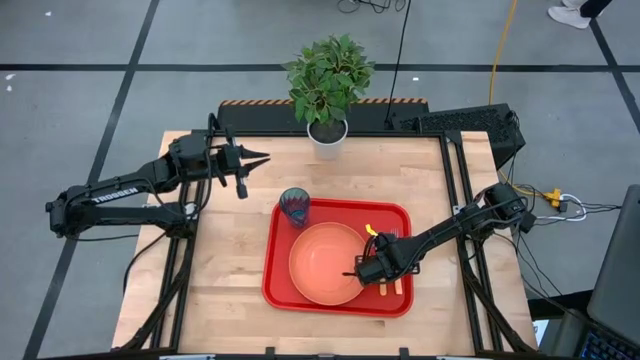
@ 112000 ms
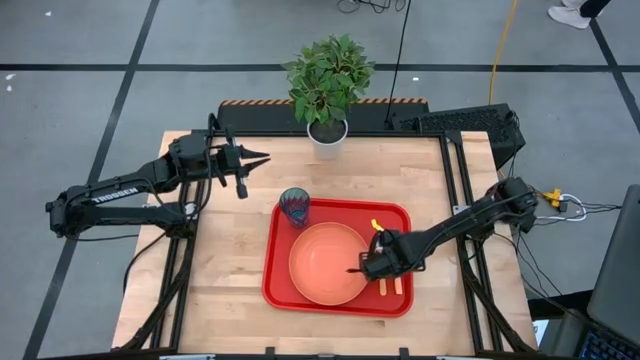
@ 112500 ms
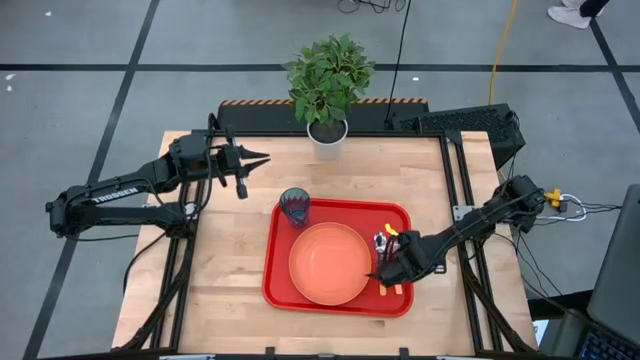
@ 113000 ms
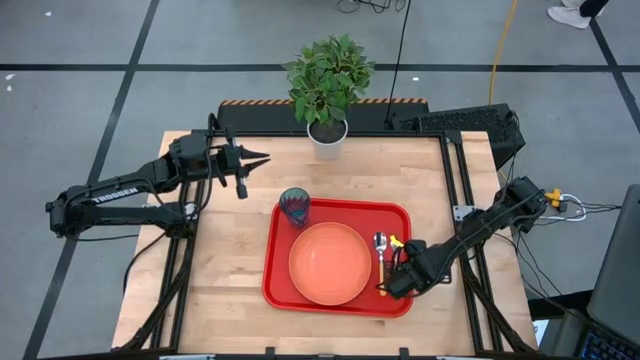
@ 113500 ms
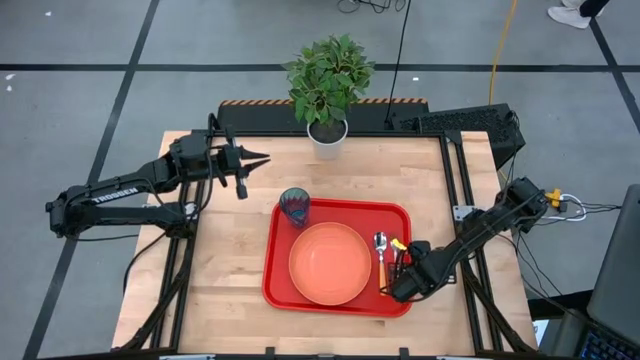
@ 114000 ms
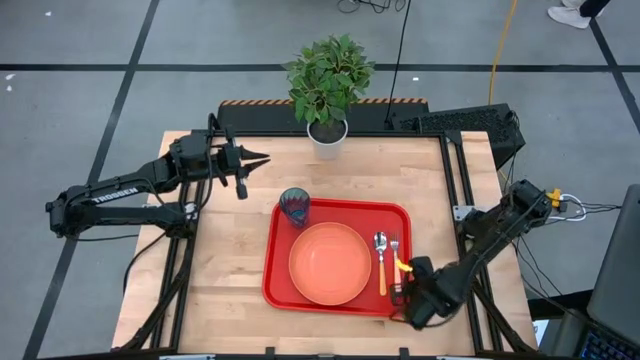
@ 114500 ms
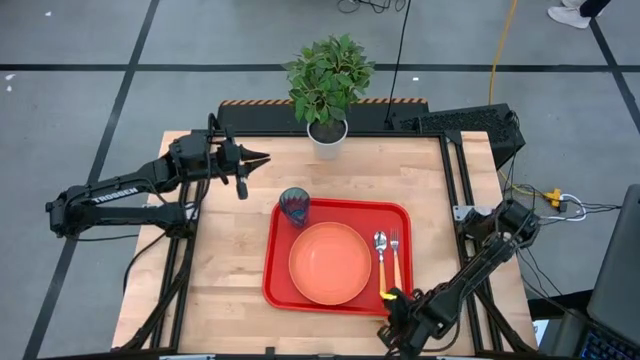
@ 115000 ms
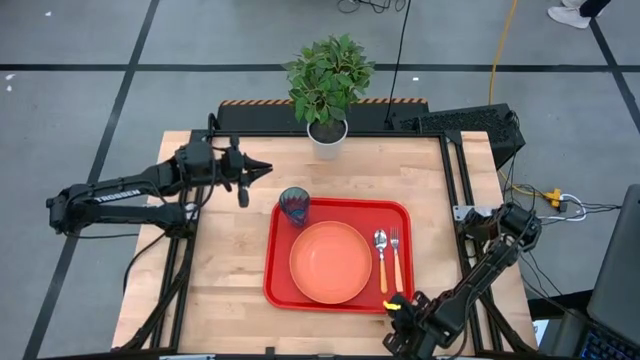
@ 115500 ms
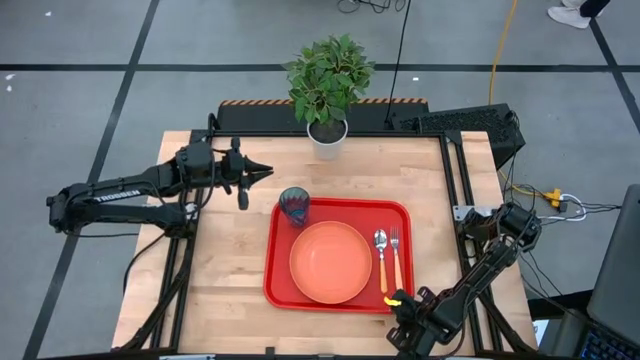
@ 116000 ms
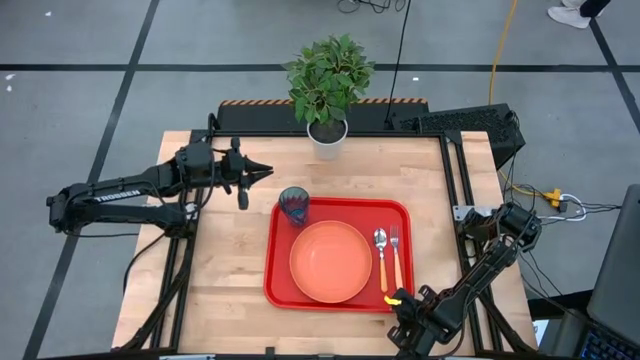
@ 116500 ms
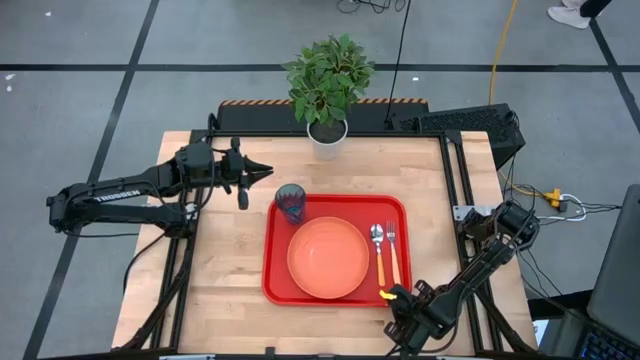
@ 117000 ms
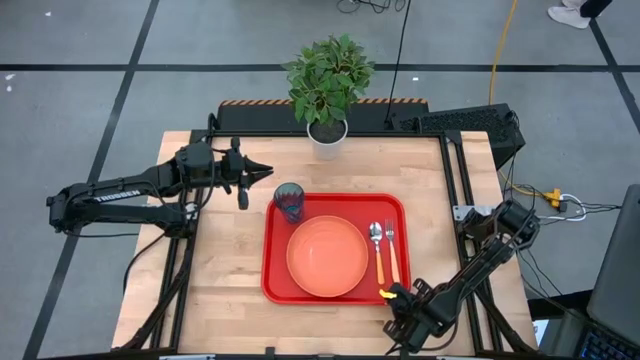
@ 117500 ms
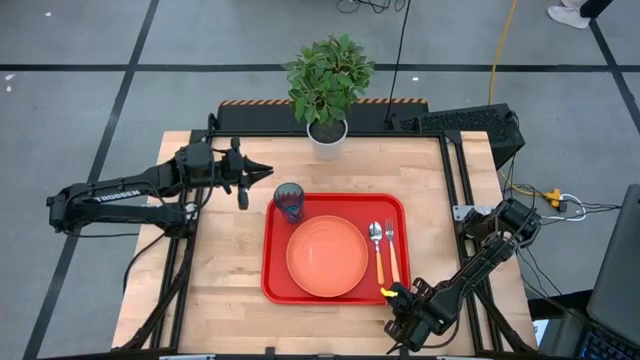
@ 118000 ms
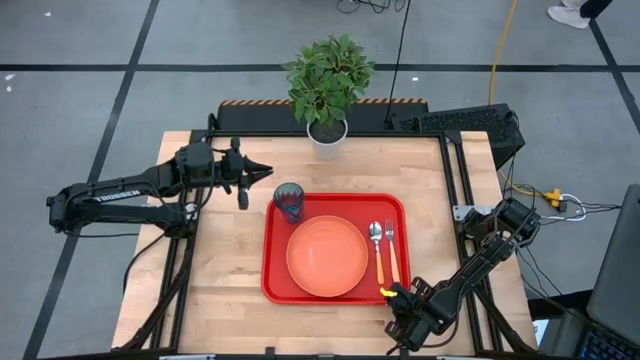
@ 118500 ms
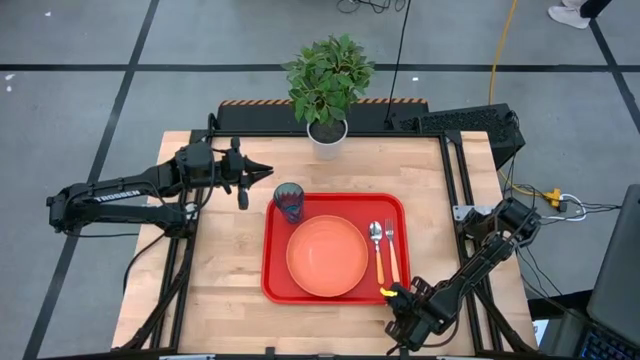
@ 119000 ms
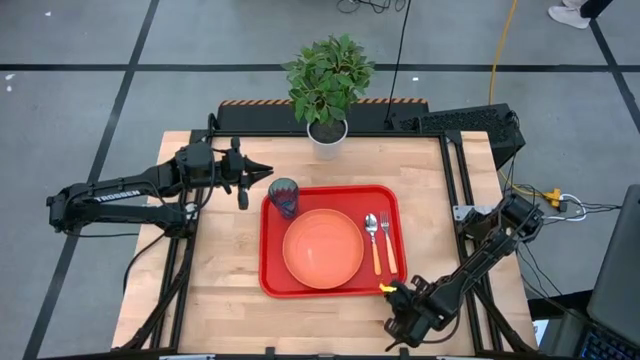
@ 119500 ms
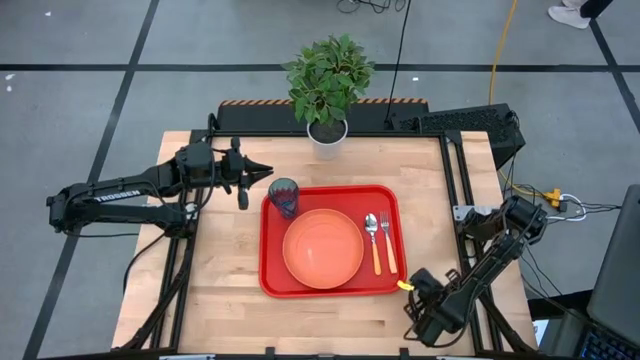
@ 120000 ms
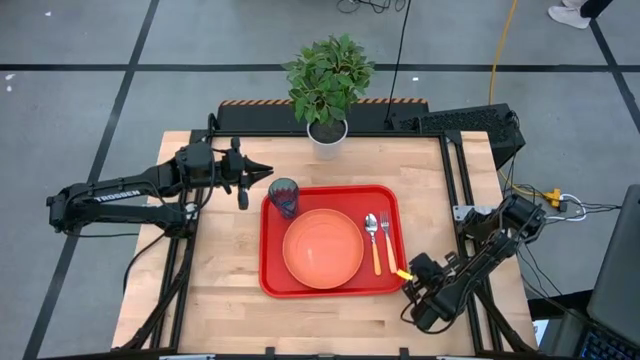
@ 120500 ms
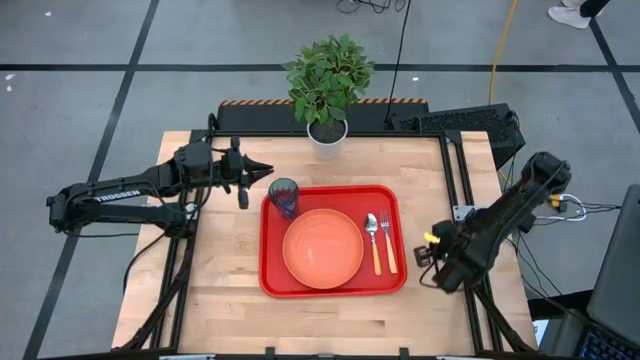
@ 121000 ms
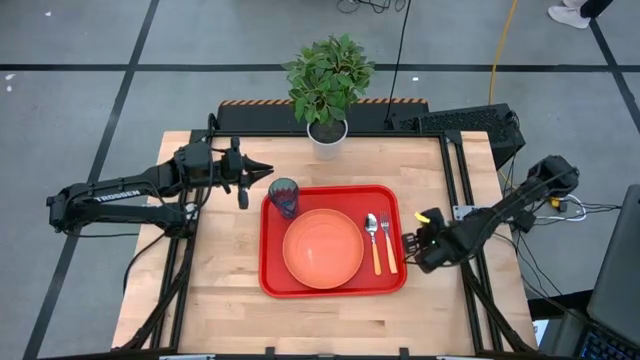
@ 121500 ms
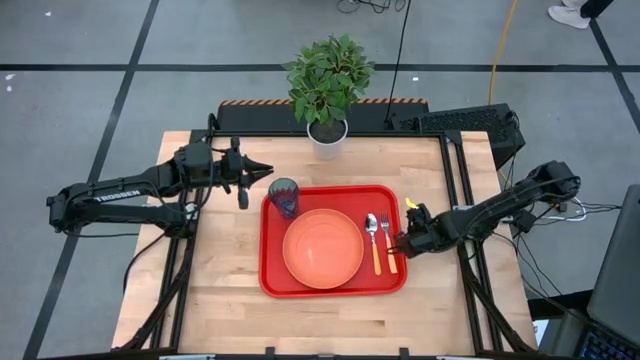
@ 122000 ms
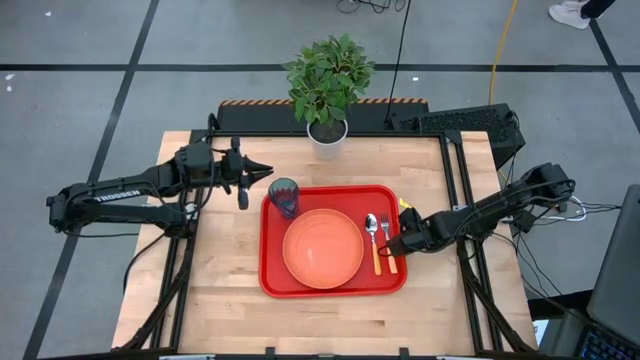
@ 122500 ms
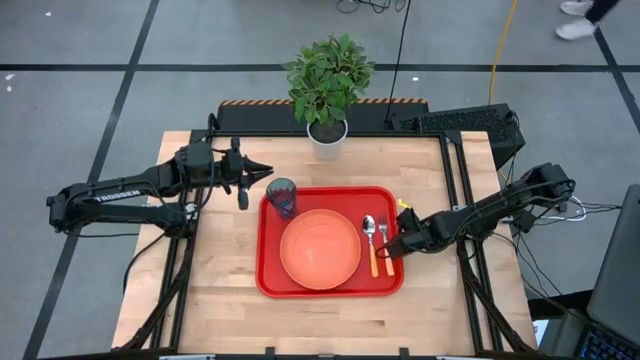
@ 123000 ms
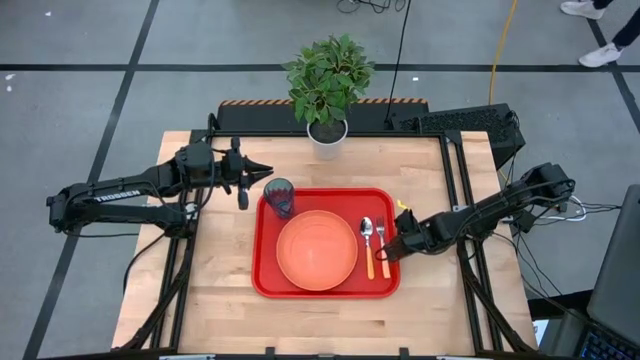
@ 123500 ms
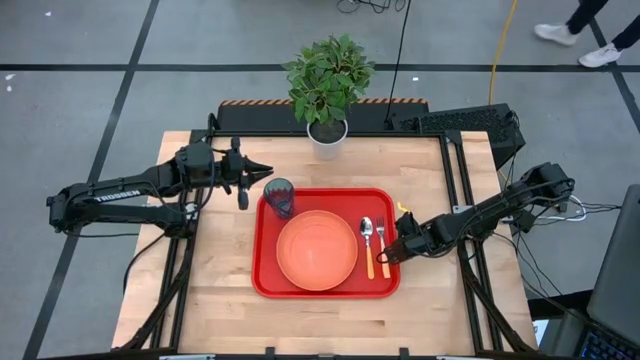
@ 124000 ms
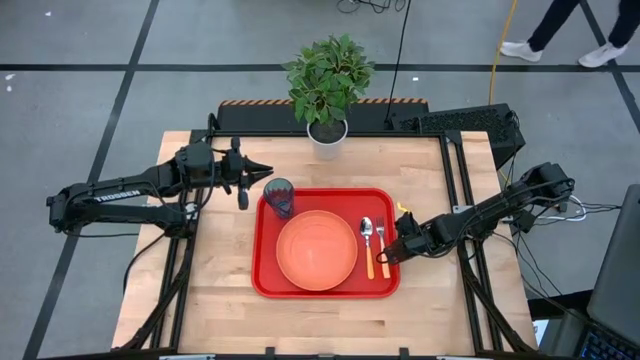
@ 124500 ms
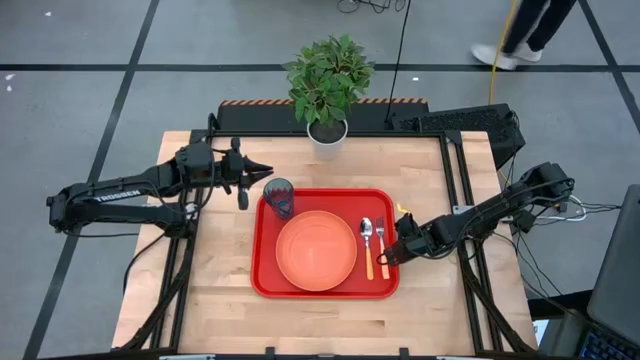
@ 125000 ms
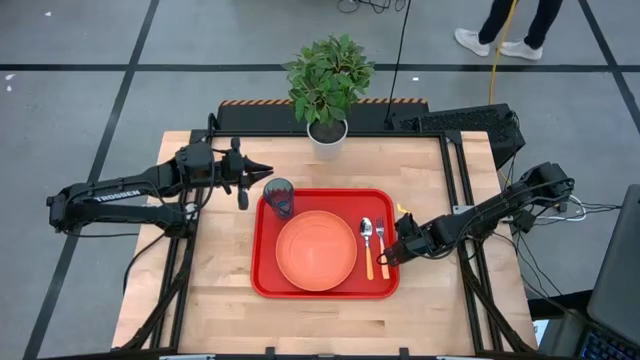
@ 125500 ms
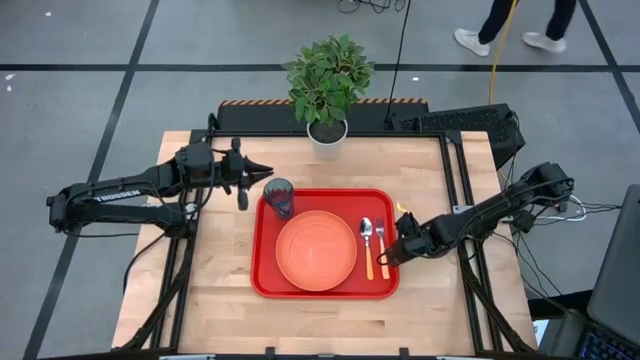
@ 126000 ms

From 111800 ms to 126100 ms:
Task: Pick and place plate/cup/fork/spoon on tray
Adjust the red tray

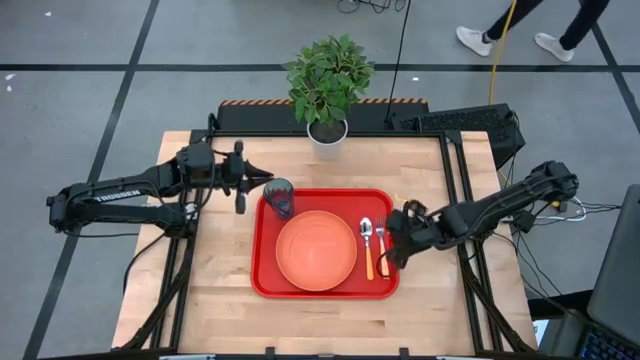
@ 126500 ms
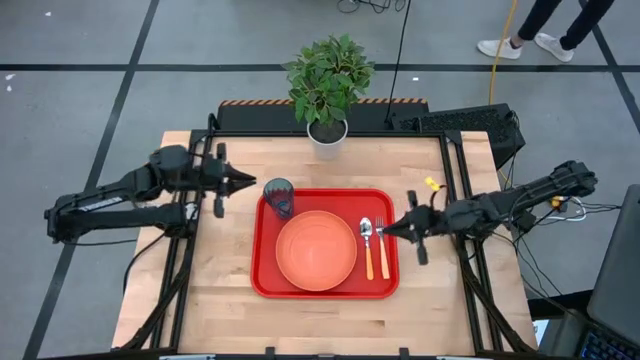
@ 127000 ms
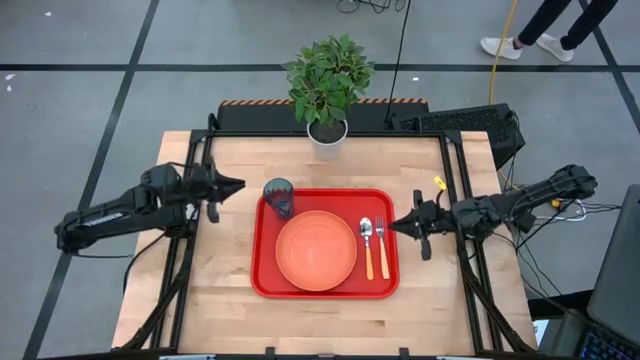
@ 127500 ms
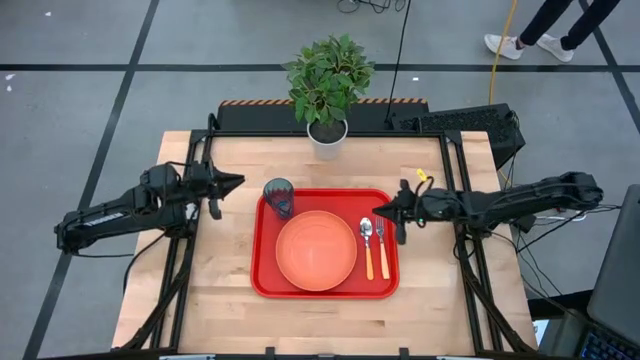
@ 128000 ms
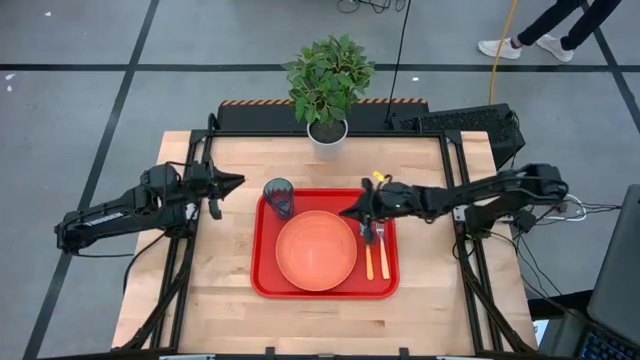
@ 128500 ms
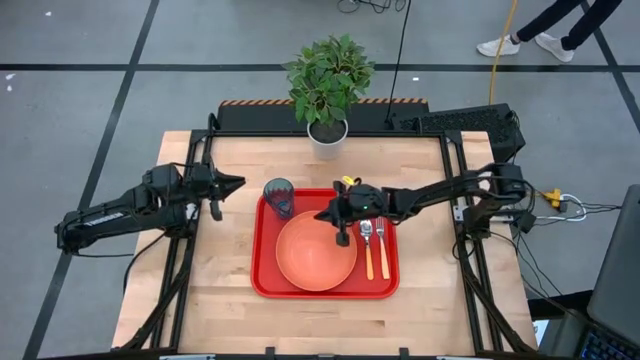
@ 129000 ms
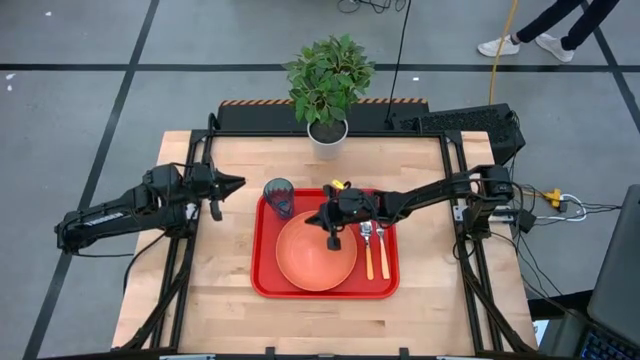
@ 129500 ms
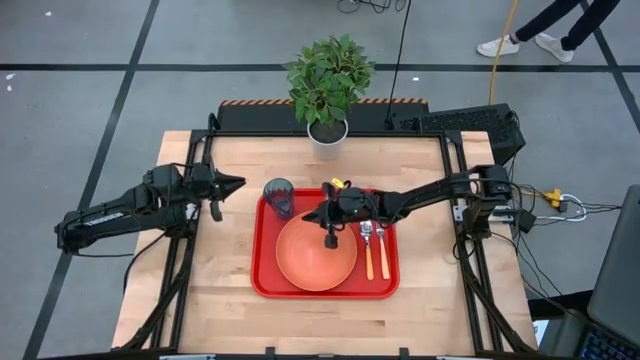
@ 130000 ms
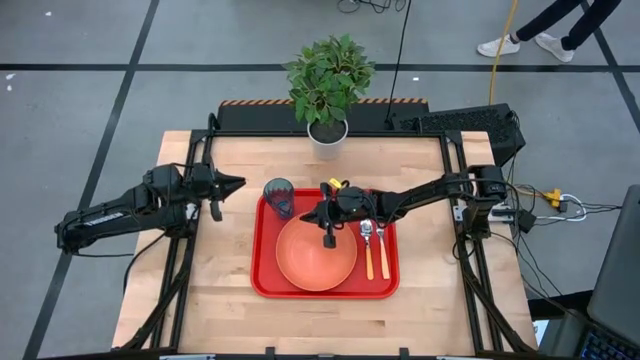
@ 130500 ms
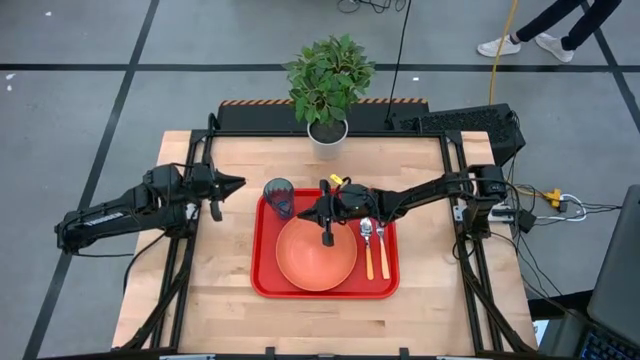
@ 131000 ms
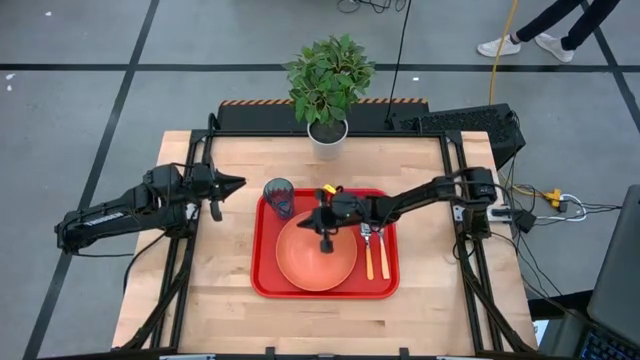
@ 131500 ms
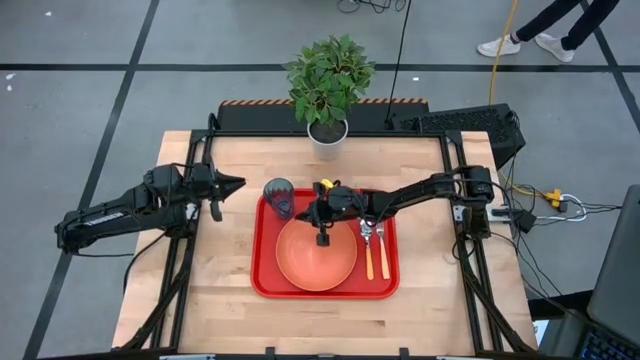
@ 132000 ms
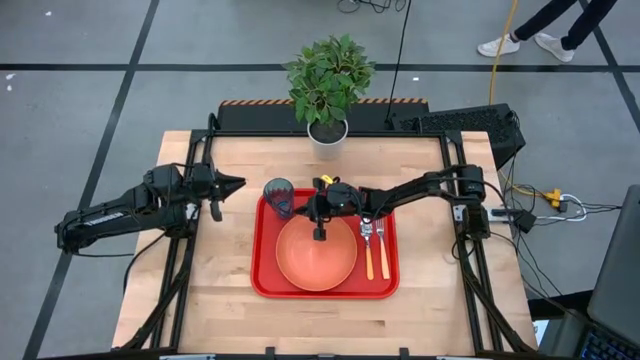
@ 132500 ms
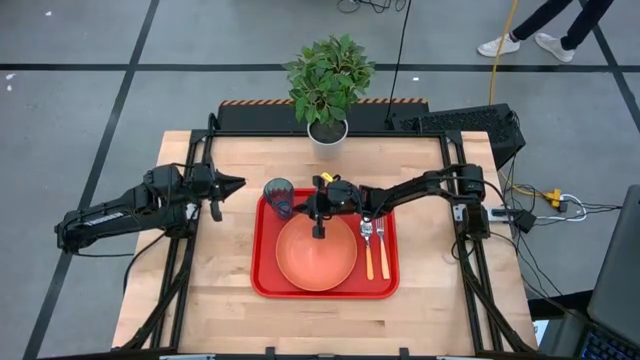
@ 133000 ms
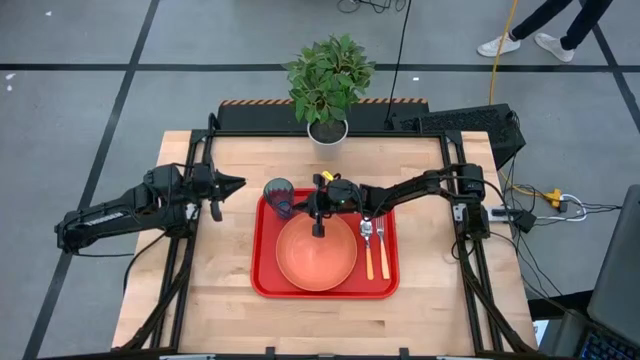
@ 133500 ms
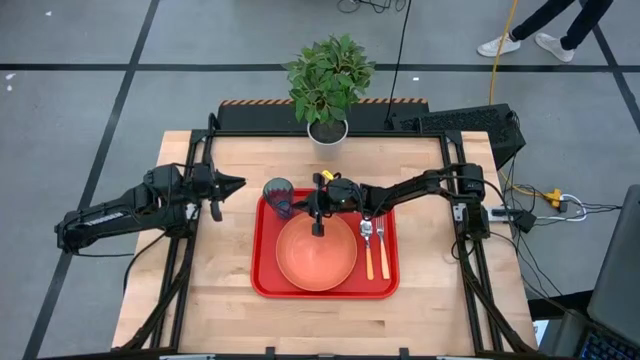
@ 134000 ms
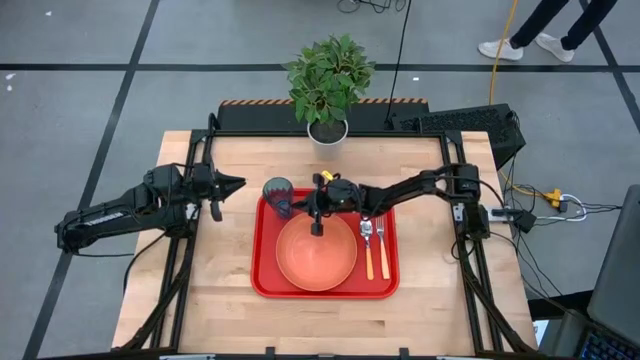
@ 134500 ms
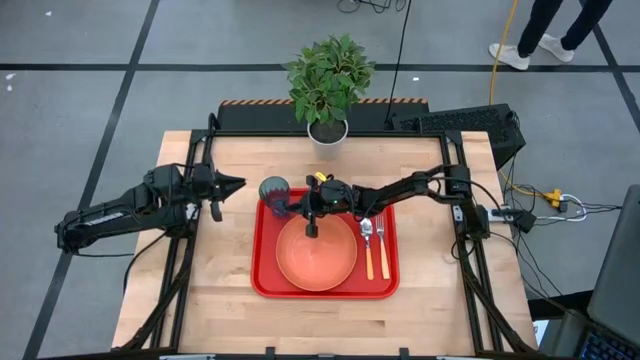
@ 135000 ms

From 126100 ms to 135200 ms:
Adjust the blue cup on the red tray
